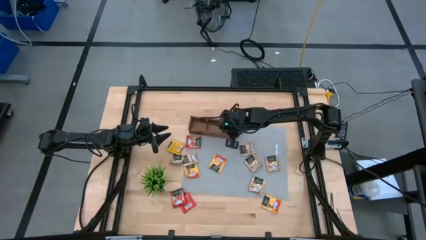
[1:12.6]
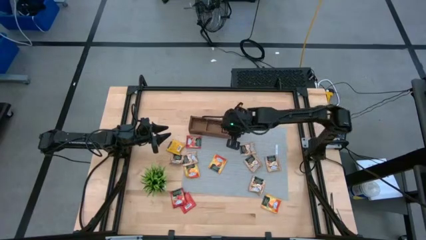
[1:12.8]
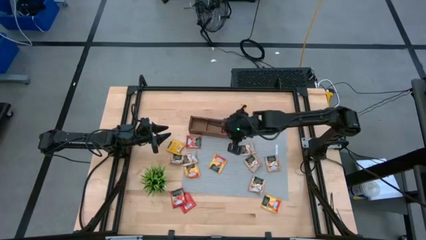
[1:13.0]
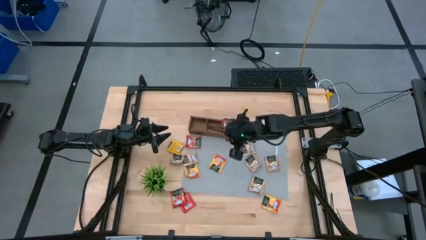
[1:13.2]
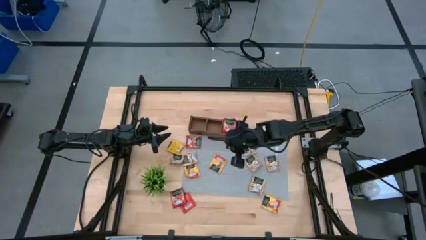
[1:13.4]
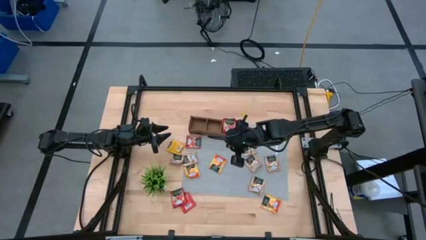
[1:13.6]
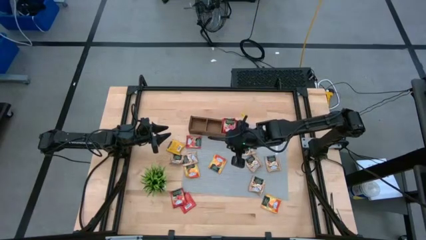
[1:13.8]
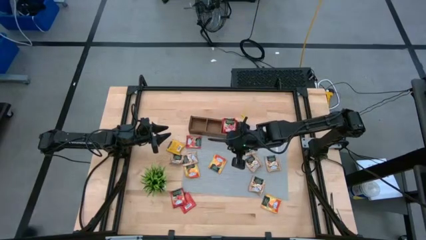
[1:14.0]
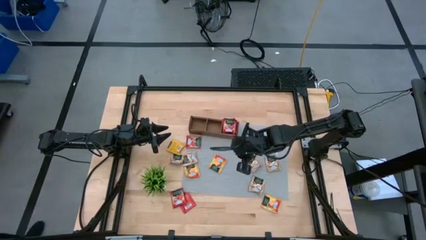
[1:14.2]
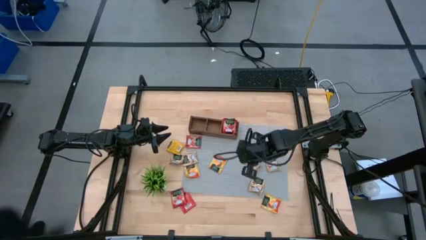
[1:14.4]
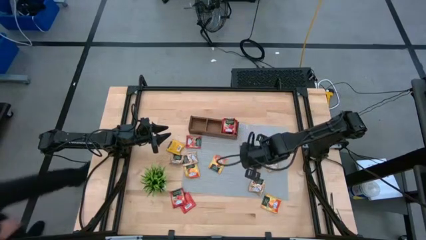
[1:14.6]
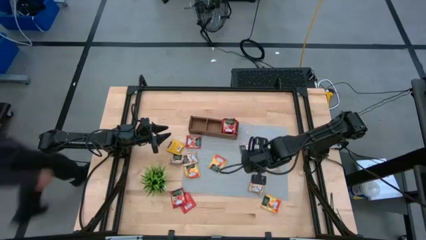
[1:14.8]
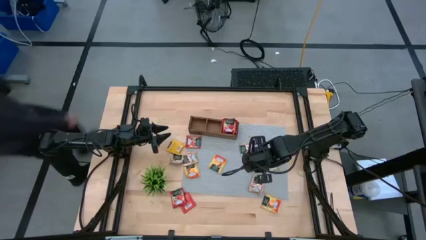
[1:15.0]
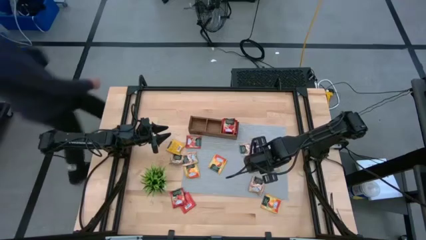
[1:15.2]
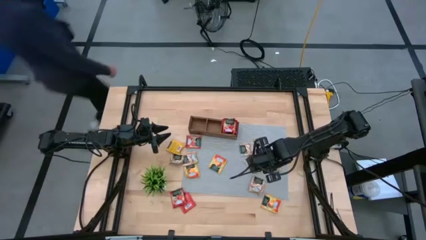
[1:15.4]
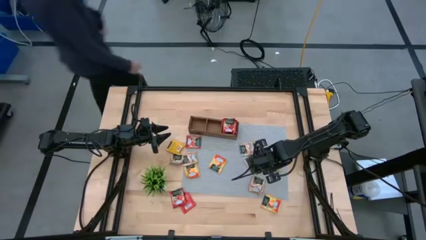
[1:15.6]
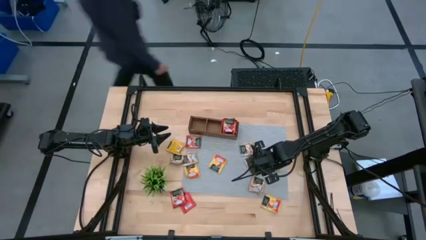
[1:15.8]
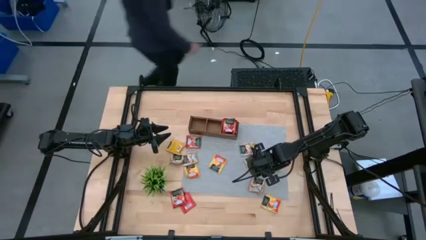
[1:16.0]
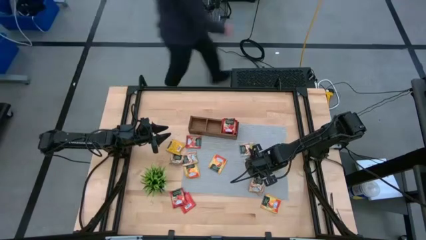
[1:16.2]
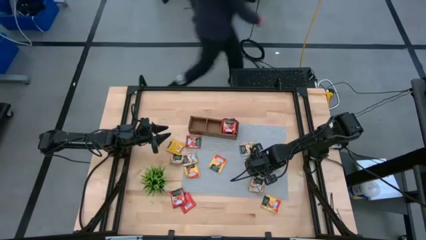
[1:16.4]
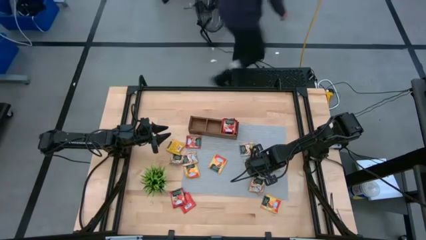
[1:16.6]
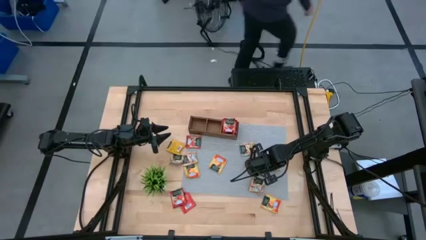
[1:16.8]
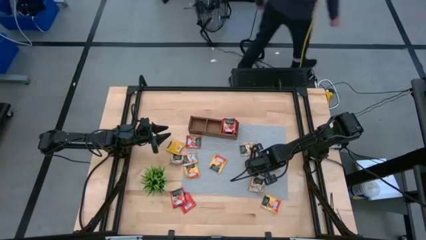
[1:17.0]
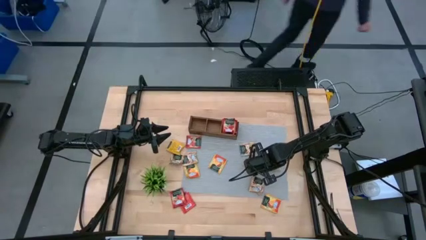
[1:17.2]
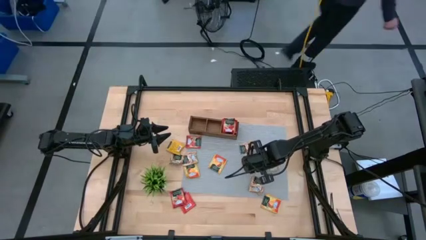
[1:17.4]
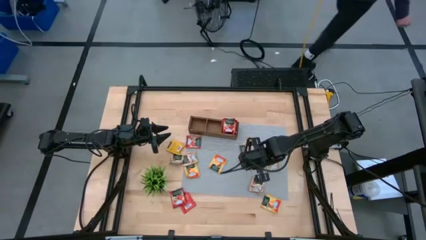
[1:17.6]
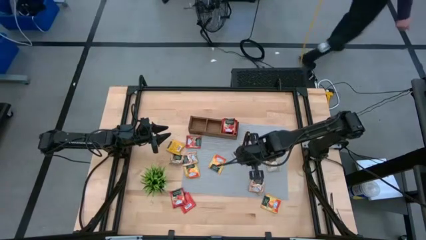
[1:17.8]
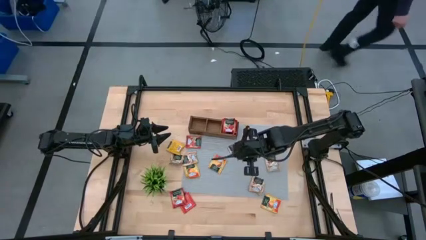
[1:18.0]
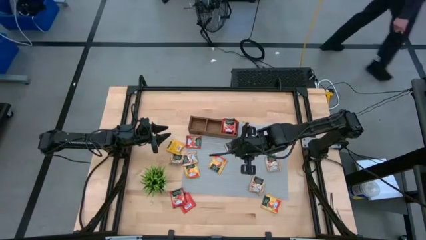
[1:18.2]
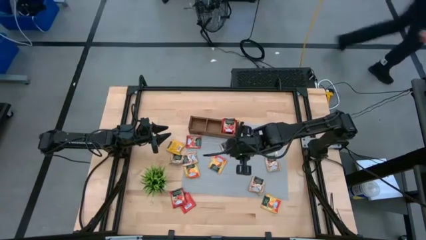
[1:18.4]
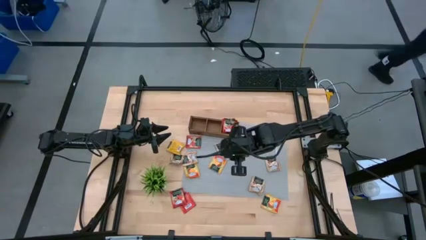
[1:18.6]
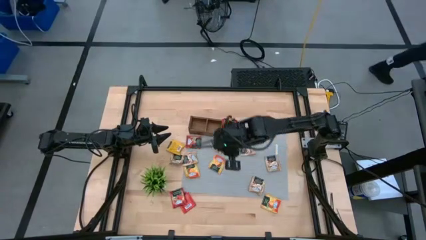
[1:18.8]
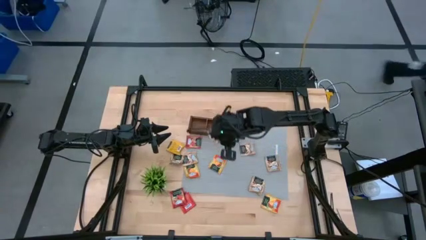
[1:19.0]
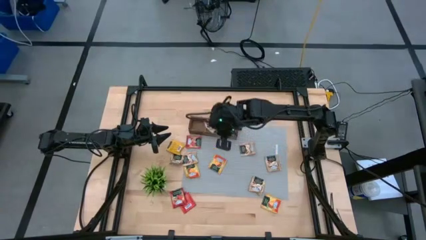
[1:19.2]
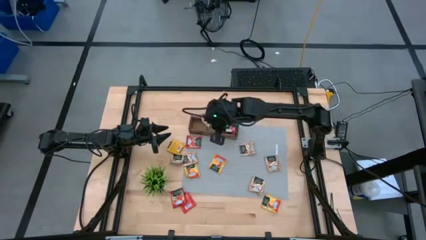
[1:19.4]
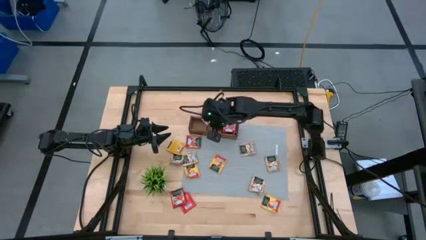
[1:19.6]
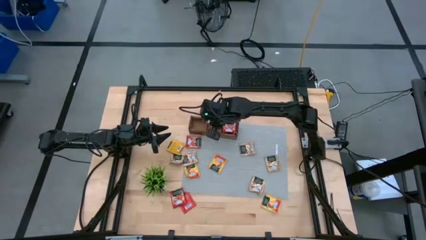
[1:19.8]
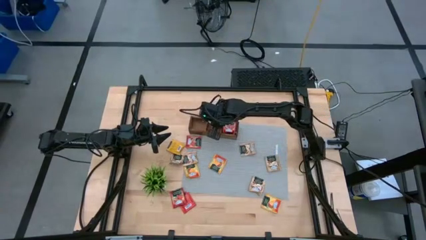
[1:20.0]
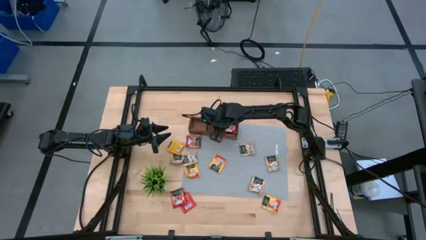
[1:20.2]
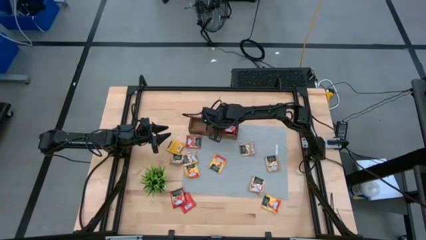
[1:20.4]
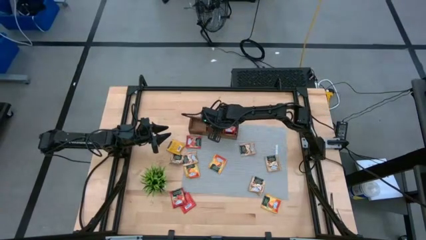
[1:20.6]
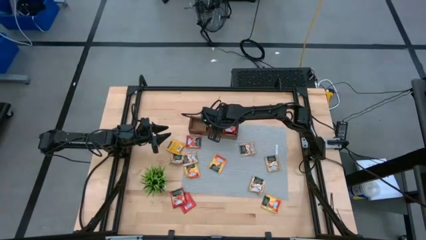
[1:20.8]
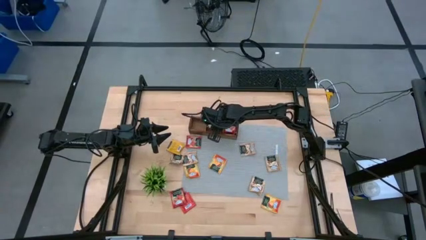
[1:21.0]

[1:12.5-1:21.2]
Task: Pick & Place Tea
Put the gold tea bag into the middle section of the wooden organizer

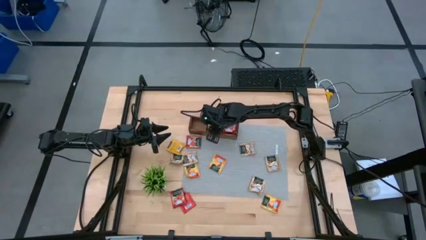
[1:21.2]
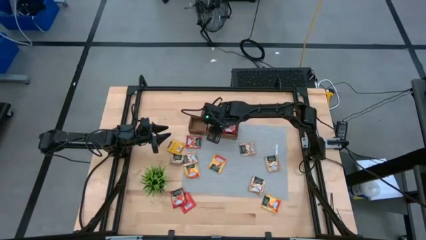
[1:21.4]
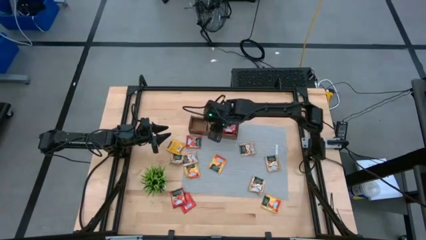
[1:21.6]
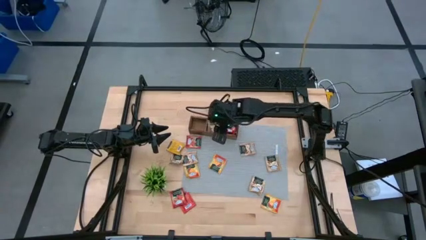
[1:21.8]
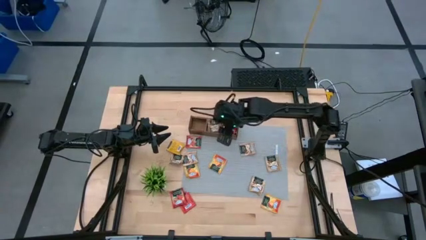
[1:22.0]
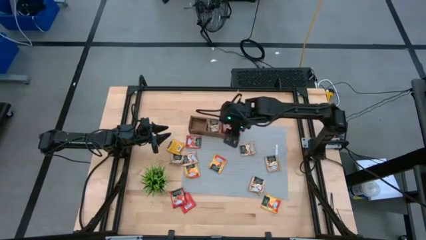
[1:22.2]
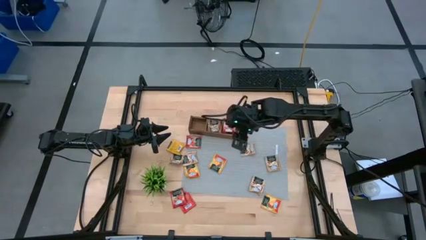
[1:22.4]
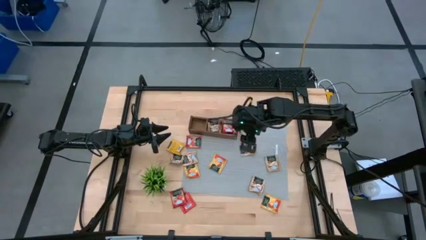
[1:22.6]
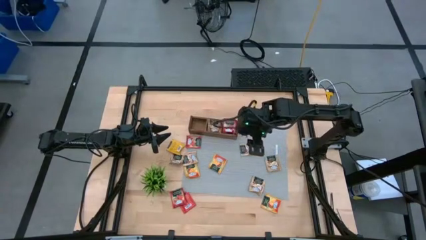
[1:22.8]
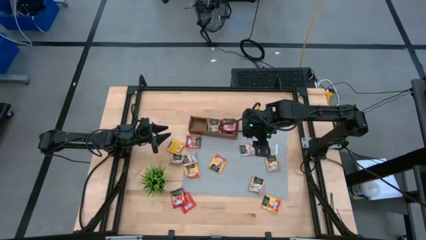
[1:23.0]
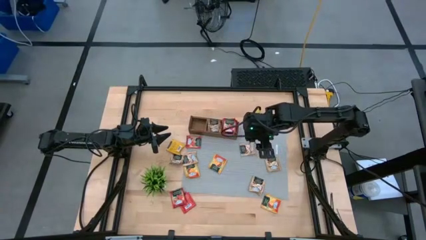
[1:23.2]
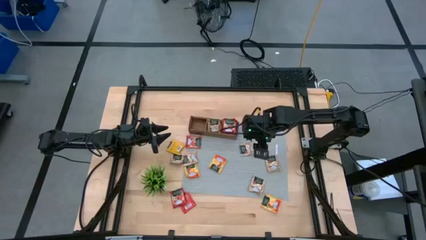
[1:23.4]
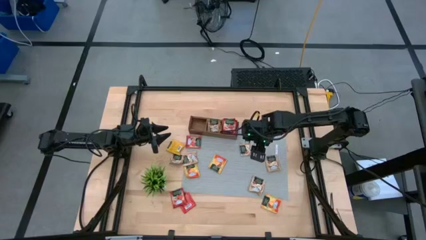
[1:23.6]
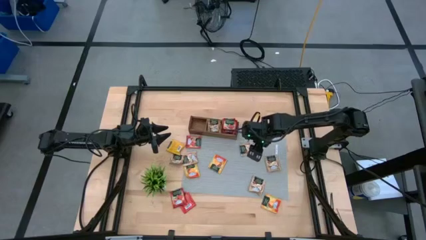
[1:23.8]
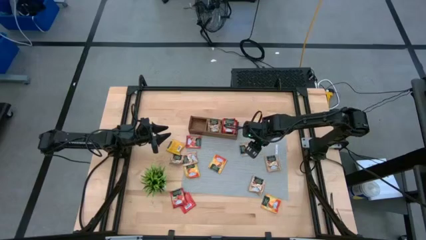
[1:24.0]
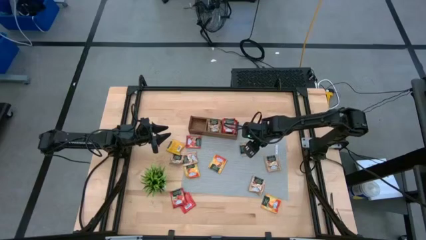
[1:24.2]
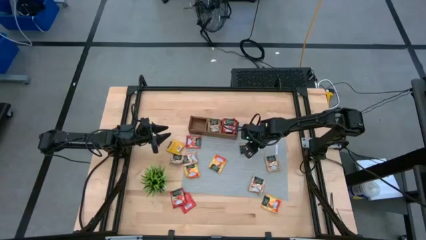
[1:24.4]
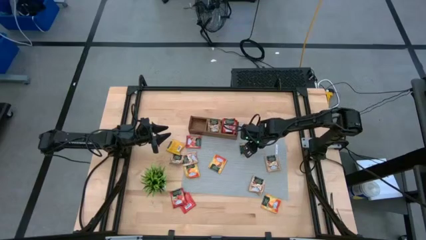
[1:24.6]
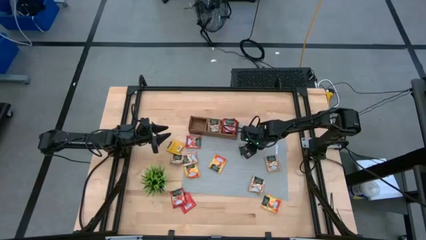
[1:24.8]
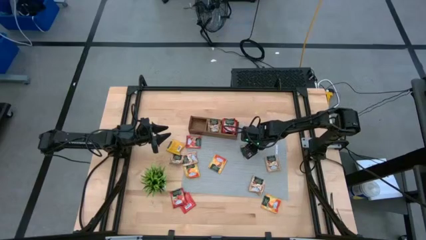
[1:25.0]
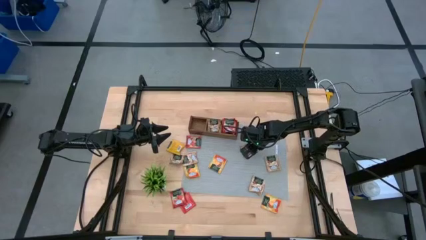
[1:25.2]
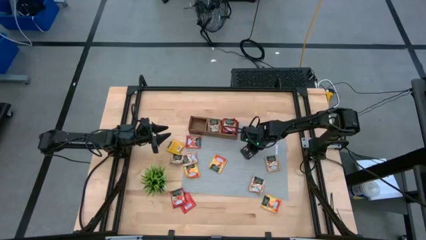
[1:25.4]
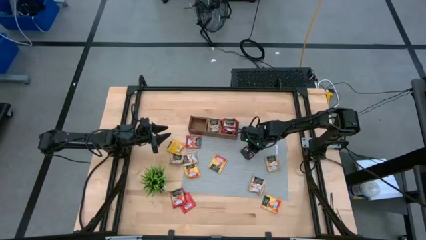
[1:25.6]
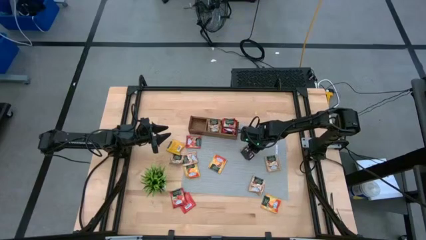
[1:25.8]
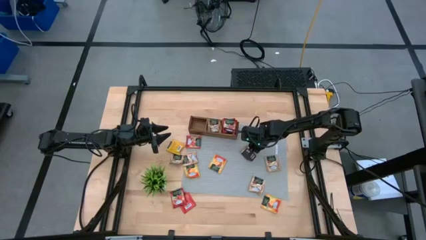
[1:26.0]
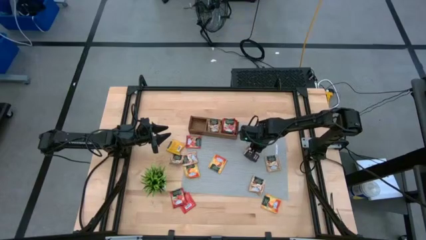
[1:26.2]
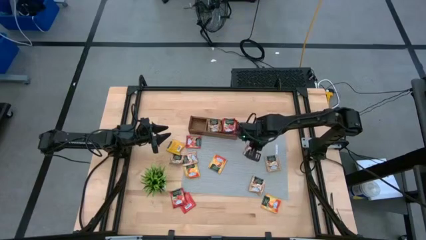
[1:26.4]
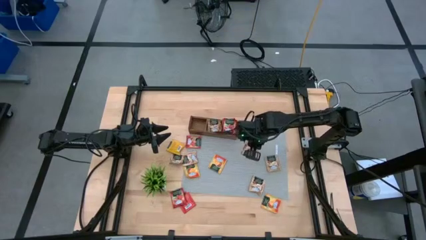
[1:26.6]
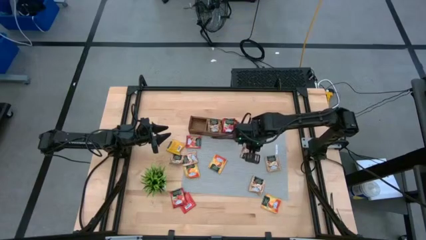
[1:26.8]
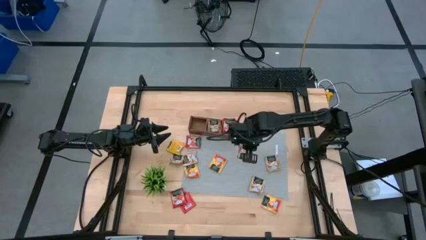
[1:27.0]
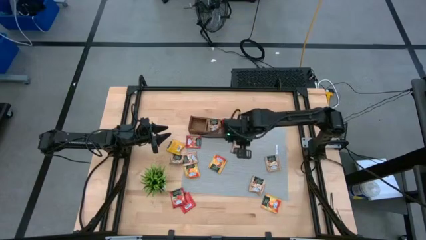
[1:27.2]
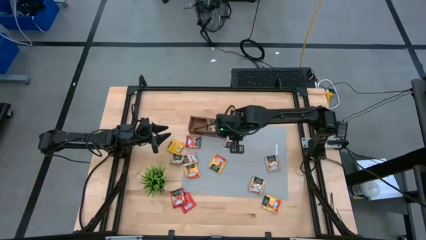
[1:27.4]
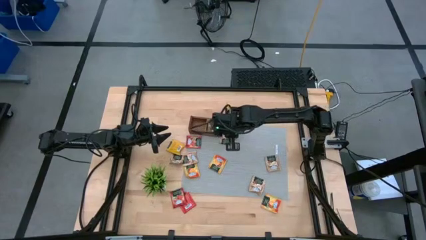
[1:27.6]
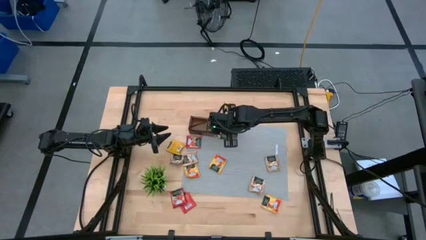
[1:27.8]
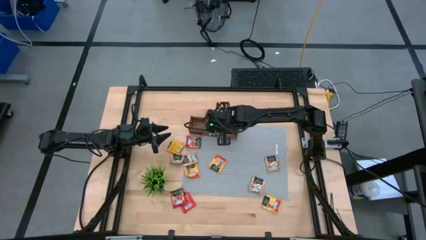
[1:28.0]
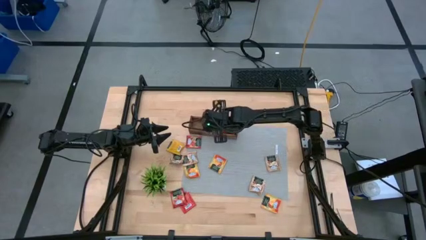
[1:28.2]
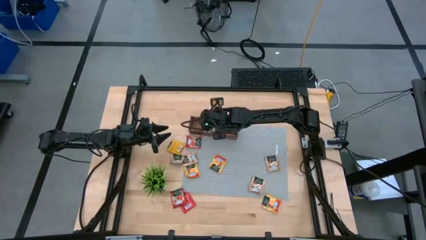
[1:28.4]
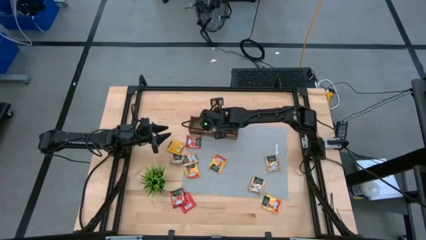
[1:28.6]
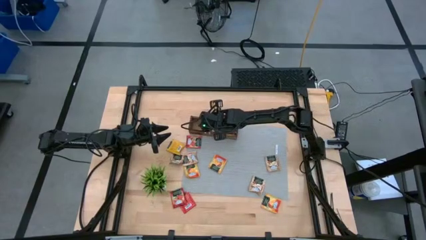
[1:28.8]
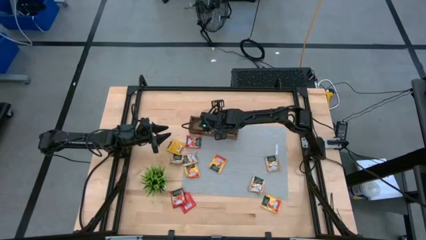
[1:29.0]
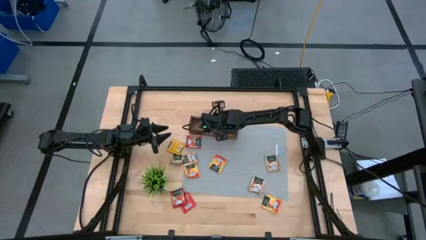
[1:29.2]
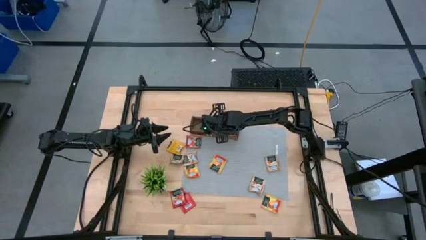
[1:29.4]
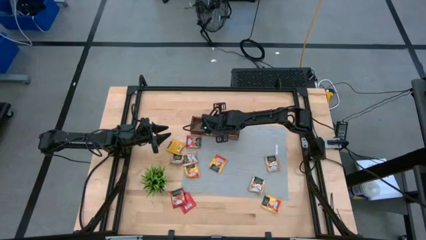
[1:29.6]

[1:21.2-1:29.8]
Put the gold tea bag into the middle section of the wooden organizer
